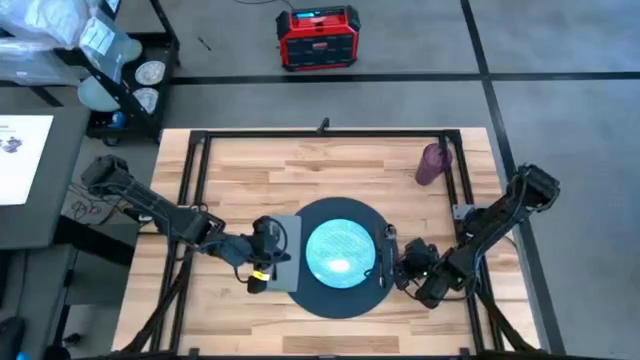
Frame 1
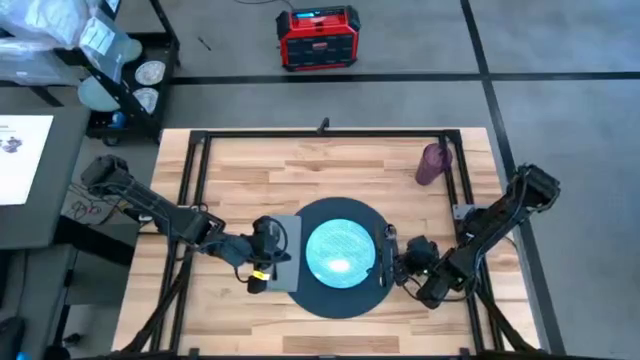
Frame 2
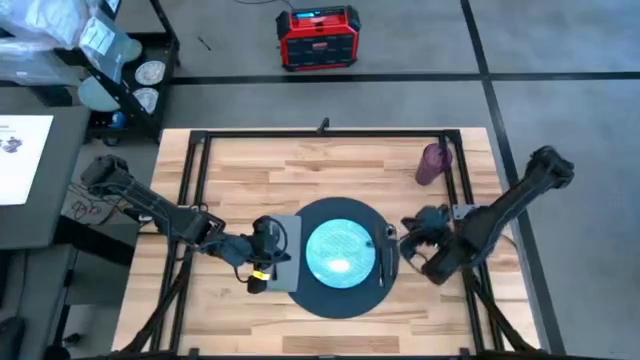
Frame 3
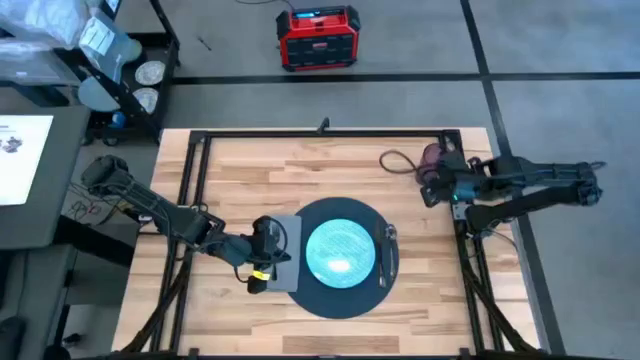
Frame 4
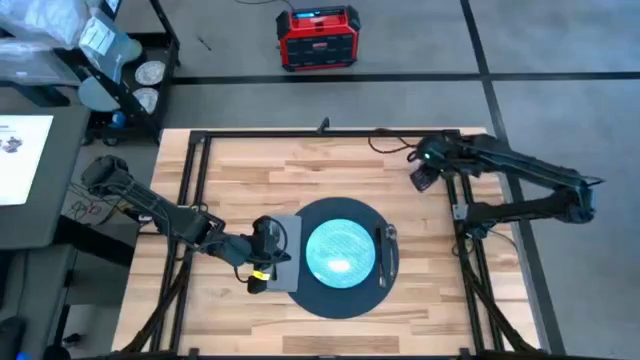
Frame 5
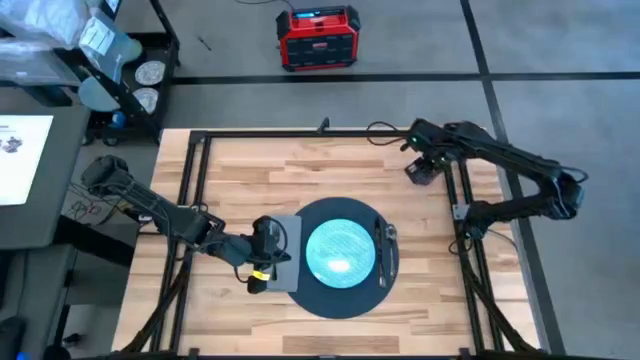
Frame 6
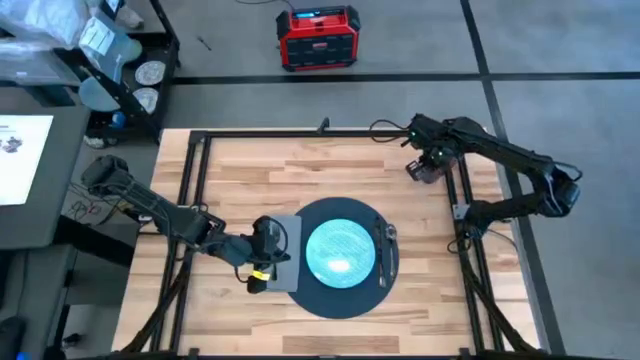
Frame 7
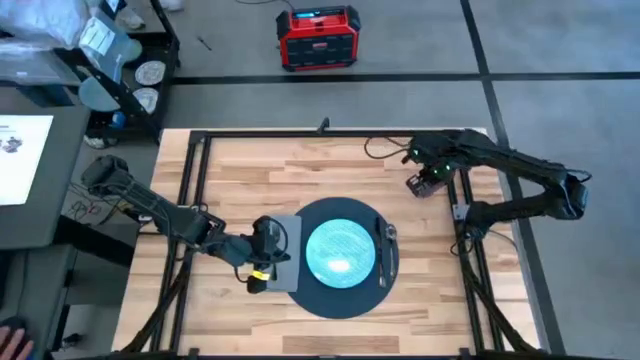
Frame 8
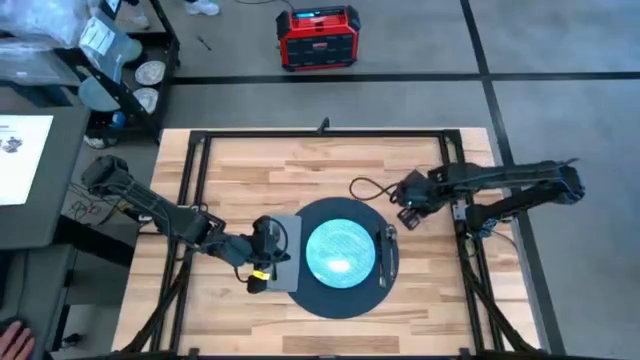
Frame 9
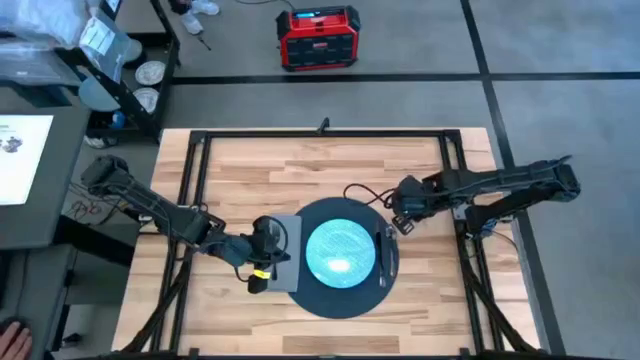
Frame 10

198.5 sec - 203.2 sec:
Task: Set table place
Move the violet glass on the top right side of the black tablemat

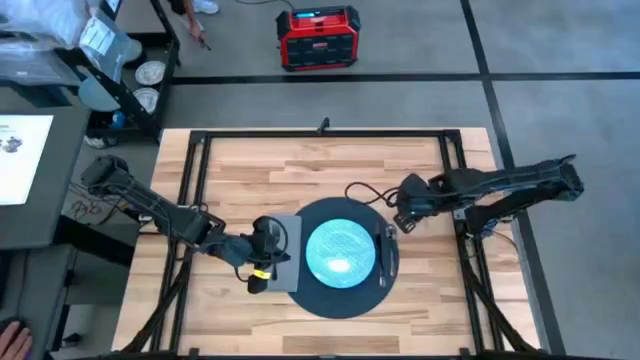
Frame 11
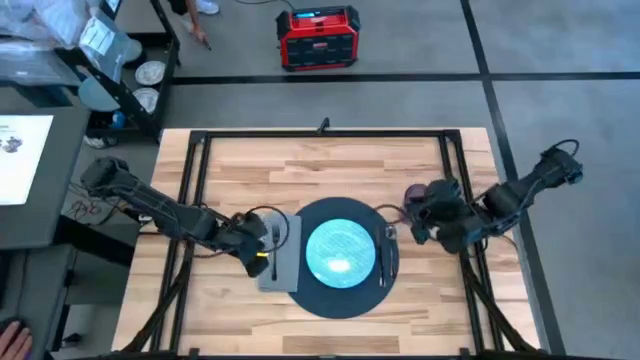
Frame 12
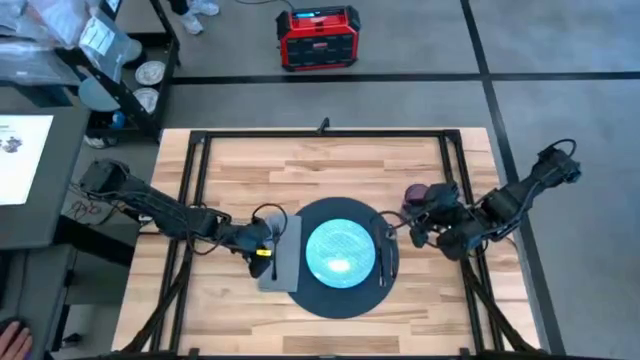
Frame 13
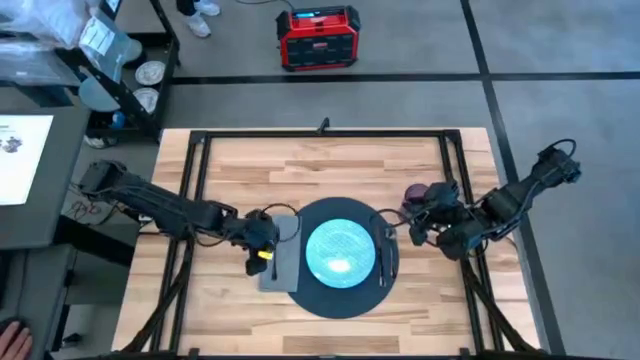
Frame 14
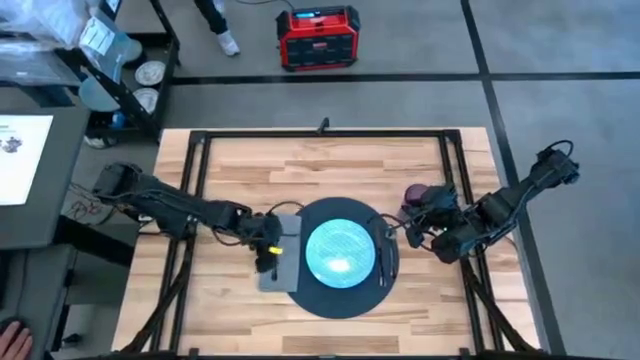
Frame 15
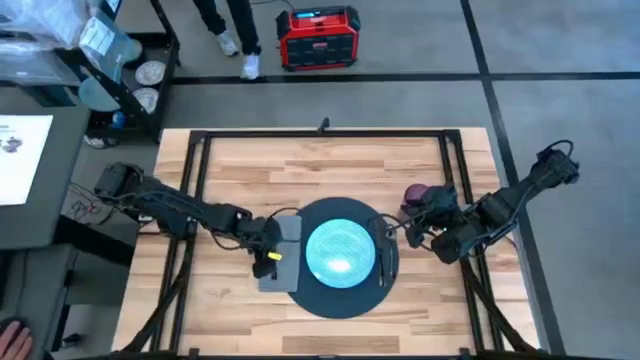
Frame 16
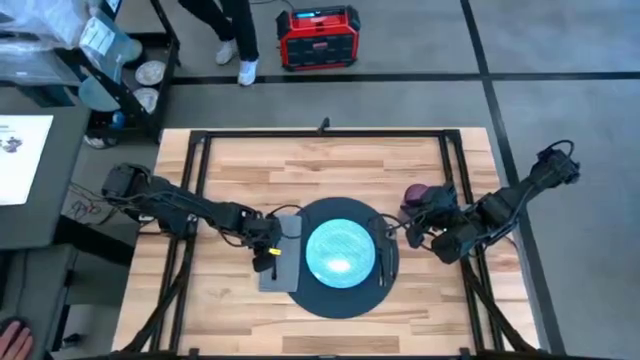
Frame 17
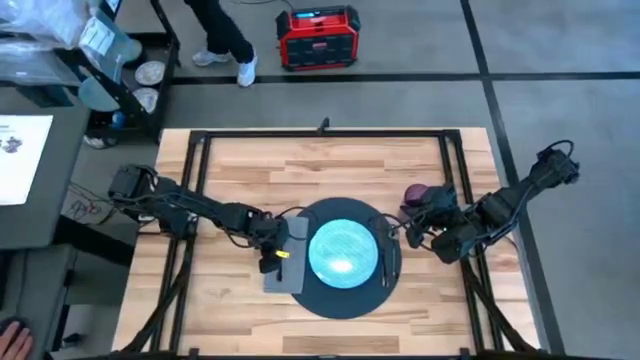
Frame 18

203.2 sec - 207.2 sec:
Adjust the black fork

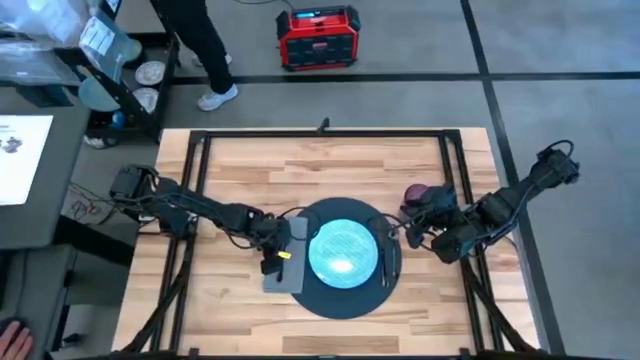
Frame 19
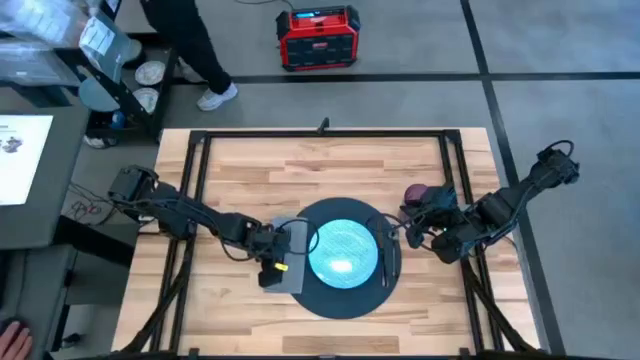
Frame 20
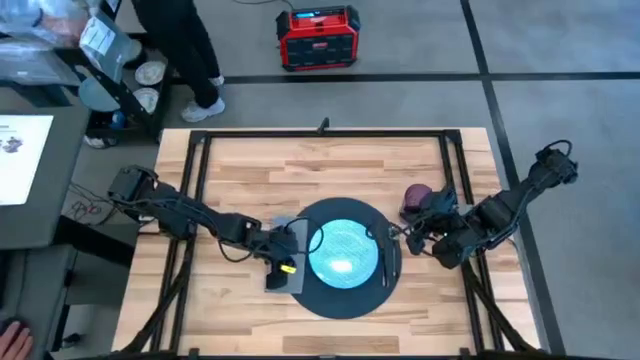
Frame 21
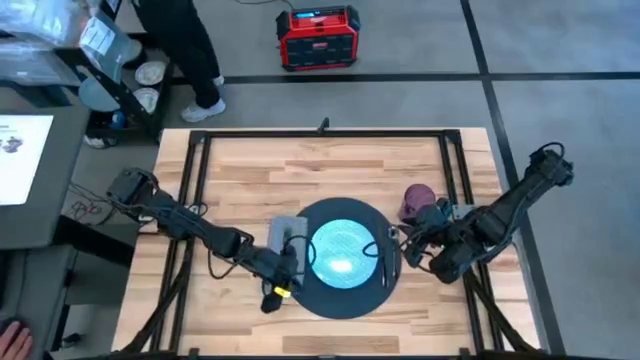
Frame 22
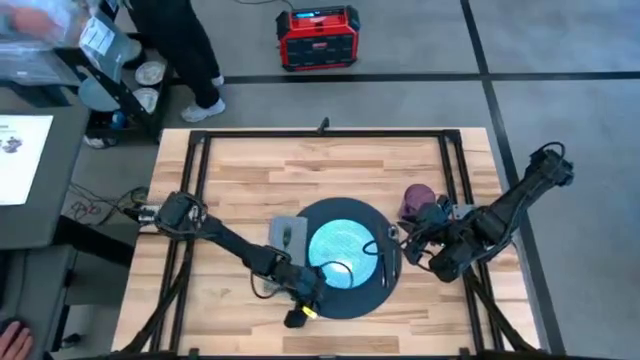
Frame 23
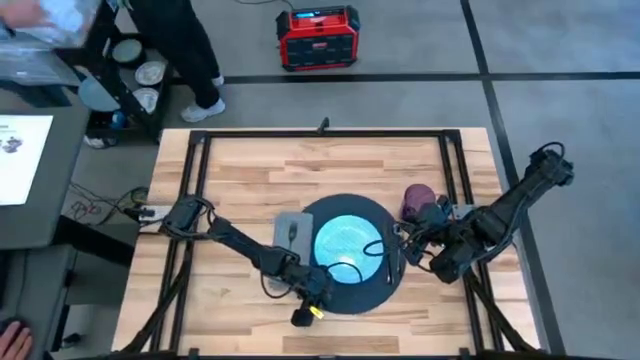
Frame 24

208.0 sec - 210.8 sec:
Adjust the black tablemat

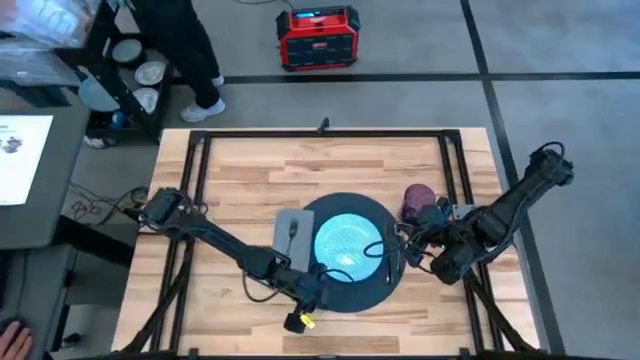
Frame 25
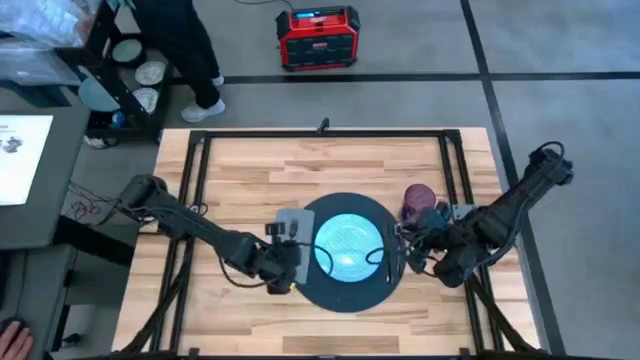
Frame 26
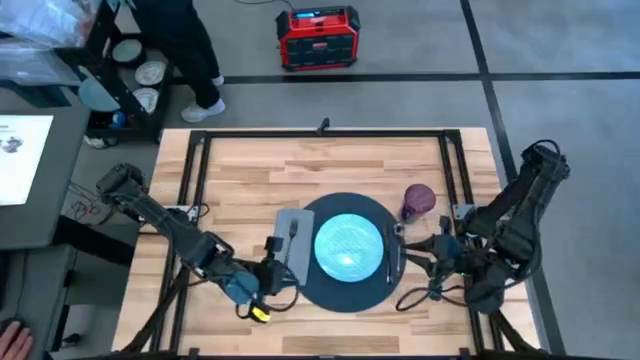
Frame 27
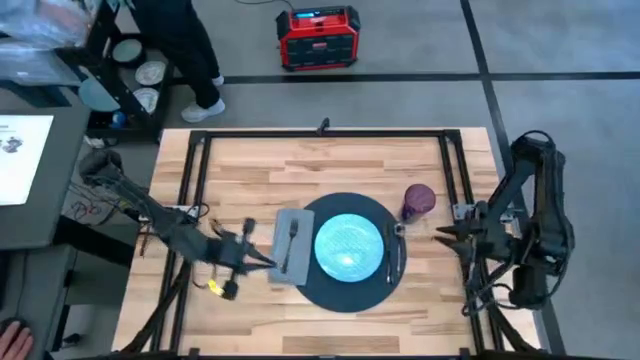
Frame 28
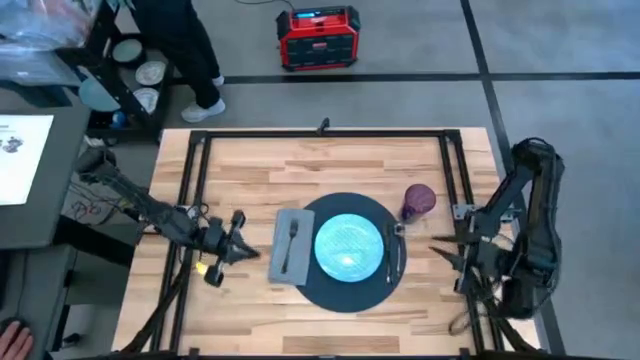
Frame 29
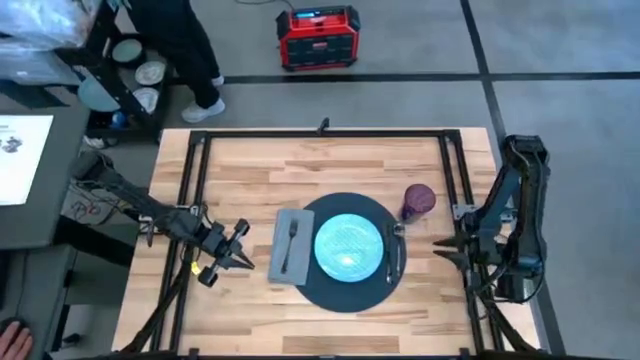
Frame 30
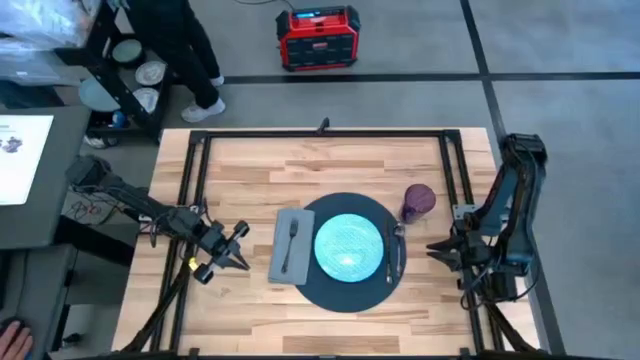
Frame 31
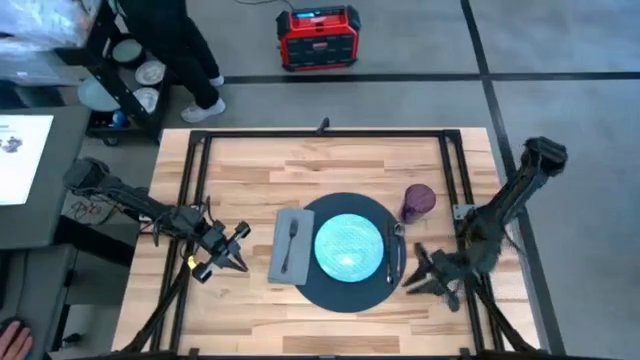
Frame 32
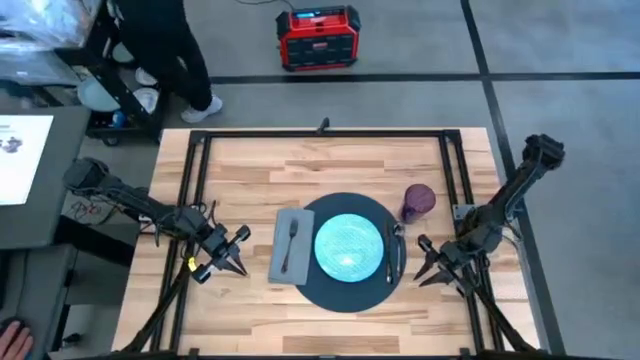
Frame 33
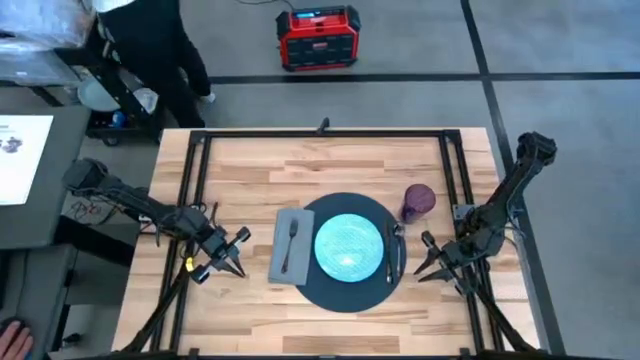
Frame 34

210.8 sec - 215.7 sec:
Return to Home Position

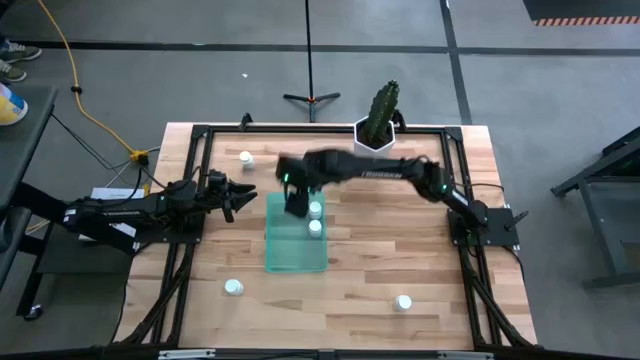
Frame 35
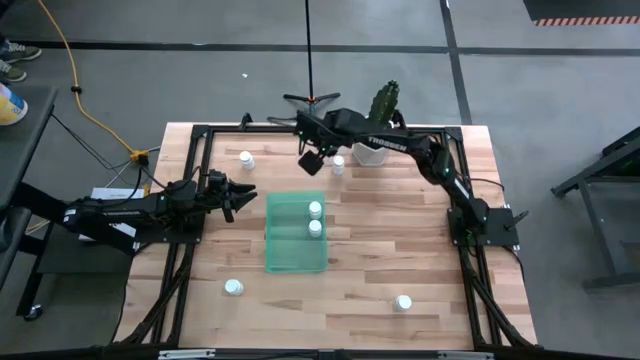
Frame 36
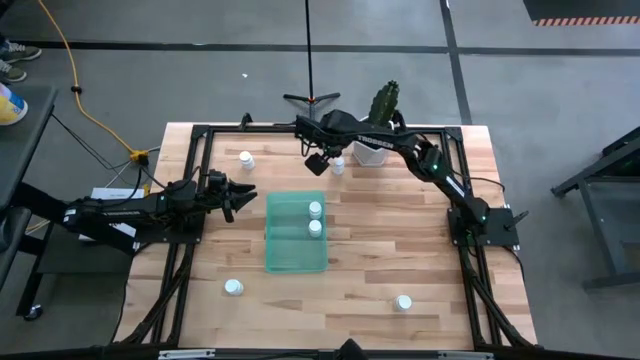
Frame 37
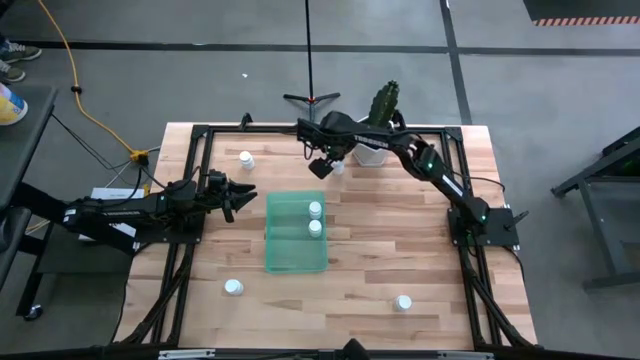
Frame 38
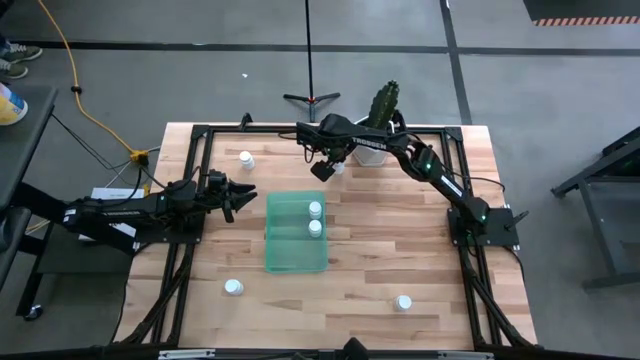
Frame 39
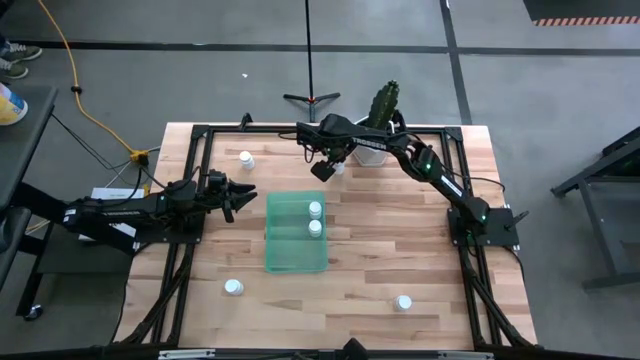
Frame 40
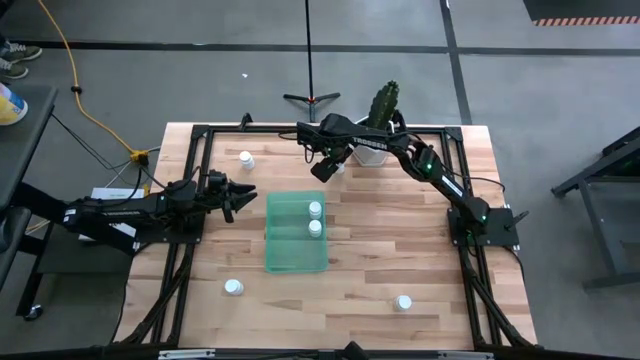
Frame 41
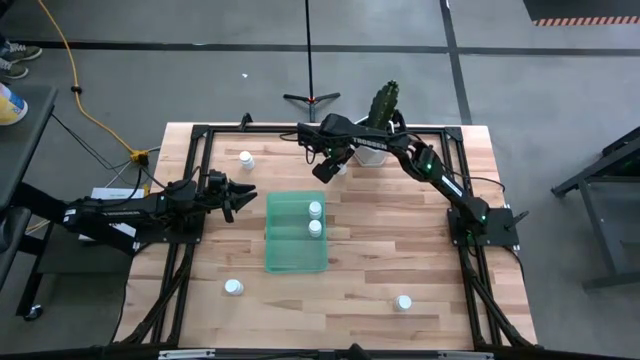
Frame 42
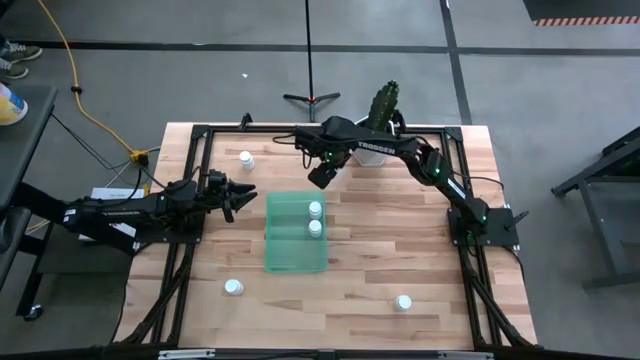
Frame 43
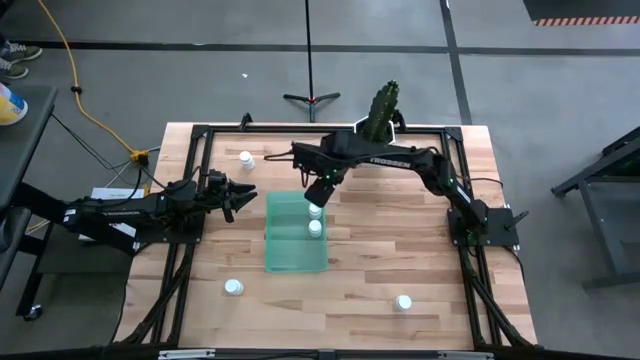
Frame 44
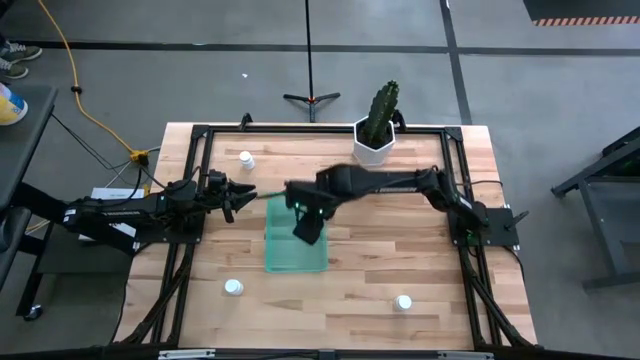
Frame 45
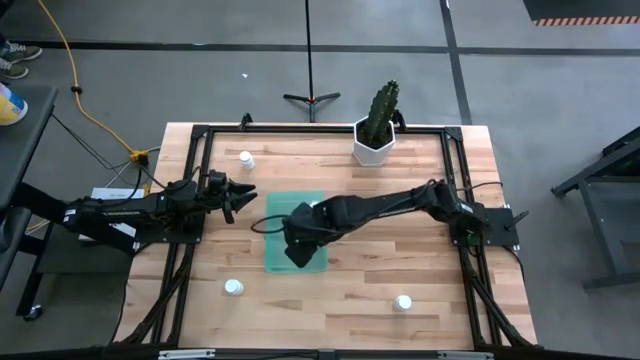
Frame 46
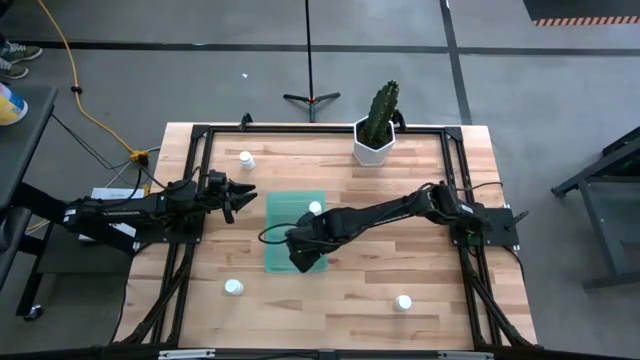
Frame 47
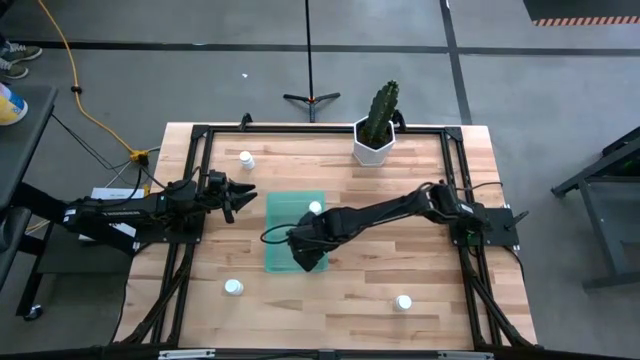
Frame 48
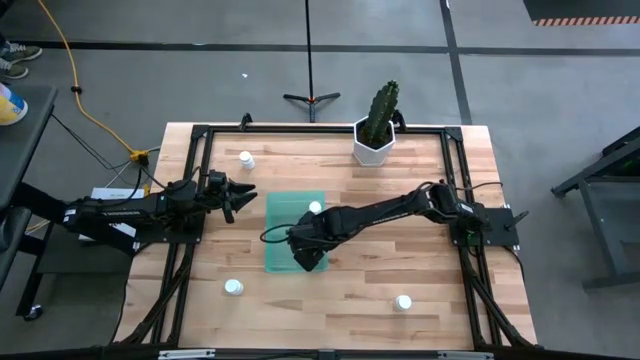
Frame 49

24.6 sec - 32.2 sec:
Task: Pick and place pill bottles into a basket
Put the pill bottle into the blue bin
